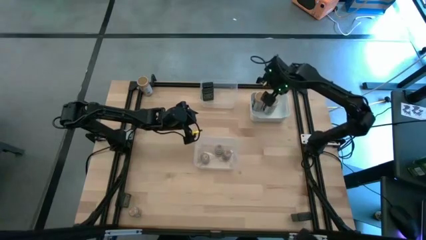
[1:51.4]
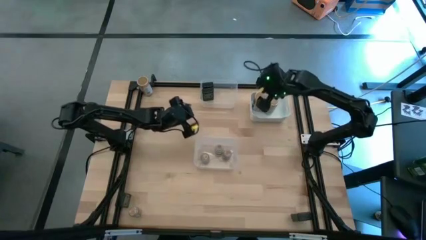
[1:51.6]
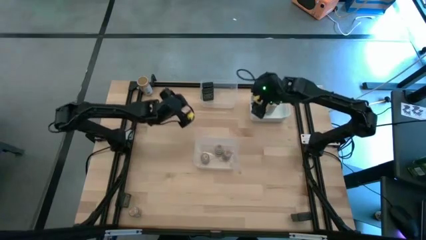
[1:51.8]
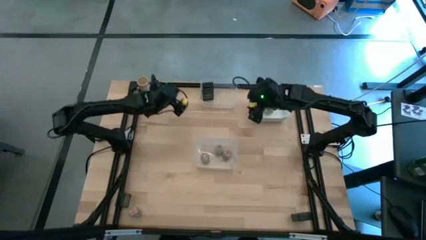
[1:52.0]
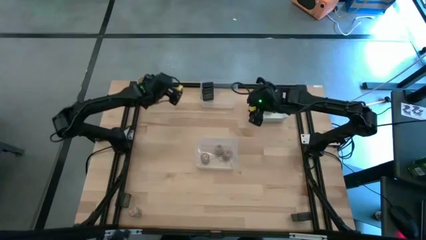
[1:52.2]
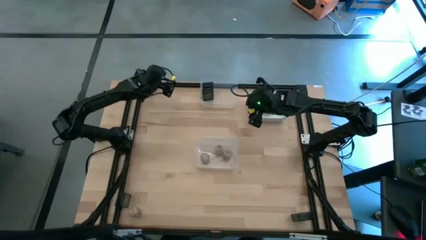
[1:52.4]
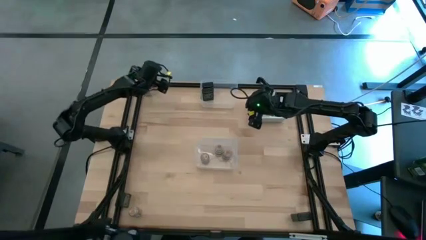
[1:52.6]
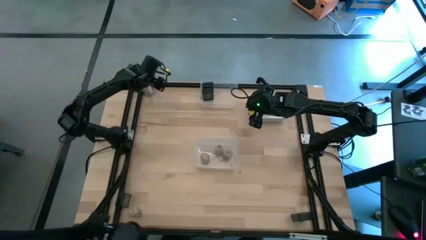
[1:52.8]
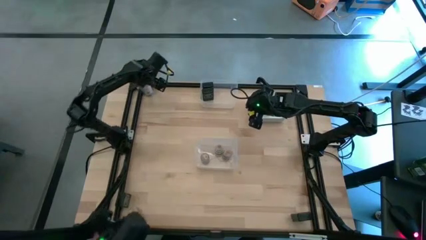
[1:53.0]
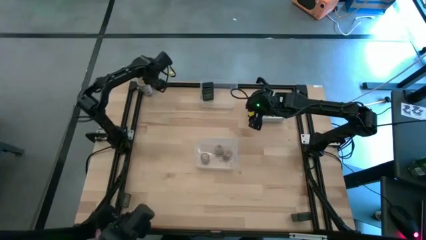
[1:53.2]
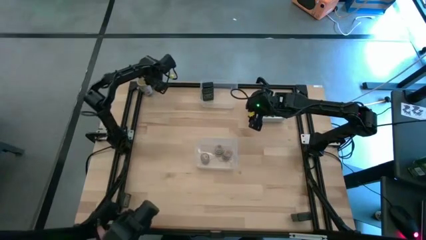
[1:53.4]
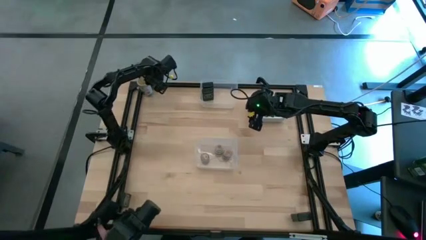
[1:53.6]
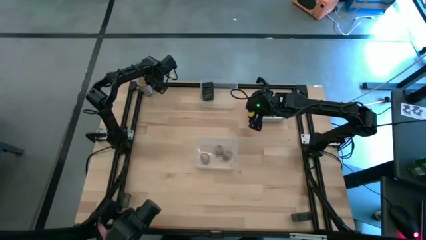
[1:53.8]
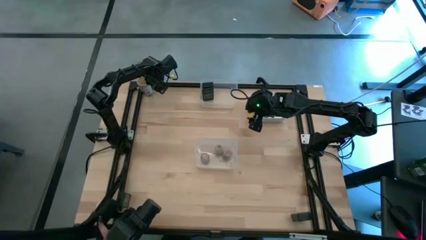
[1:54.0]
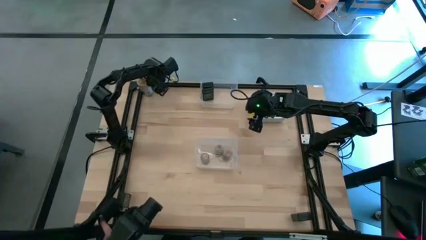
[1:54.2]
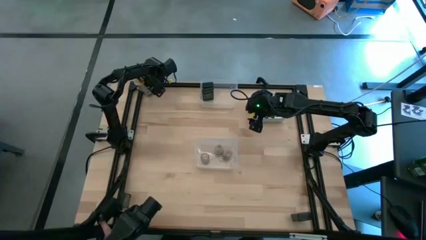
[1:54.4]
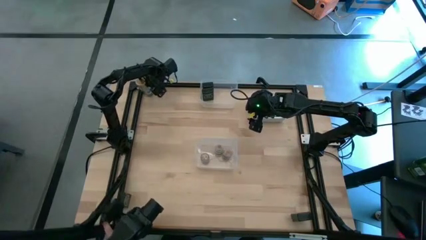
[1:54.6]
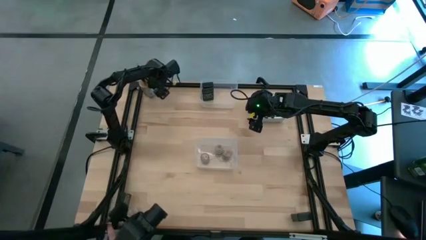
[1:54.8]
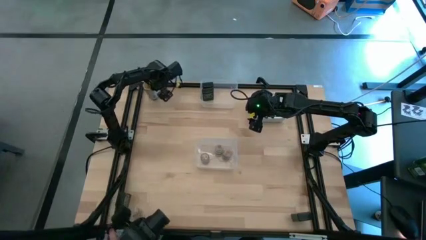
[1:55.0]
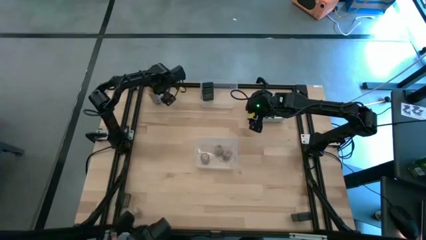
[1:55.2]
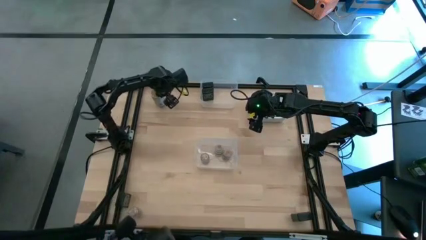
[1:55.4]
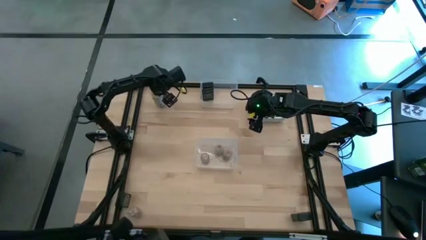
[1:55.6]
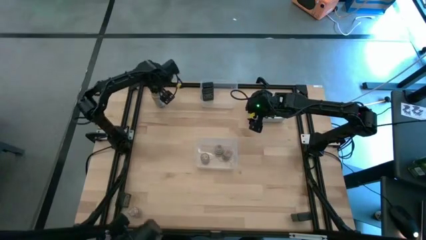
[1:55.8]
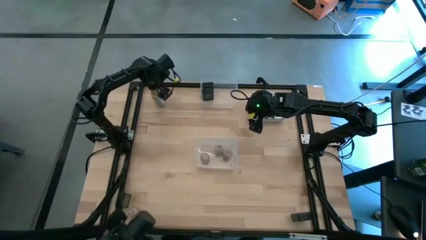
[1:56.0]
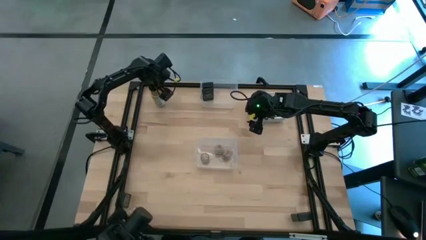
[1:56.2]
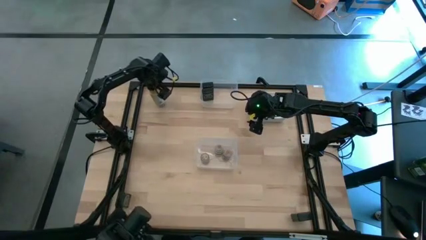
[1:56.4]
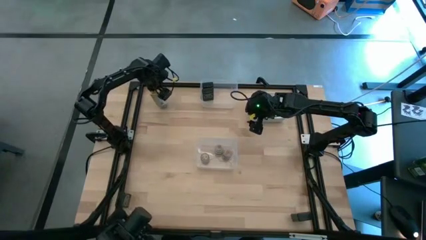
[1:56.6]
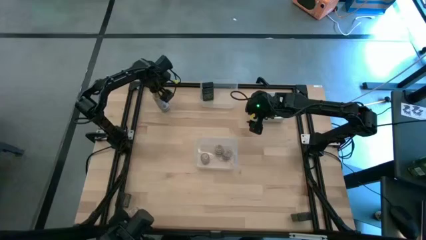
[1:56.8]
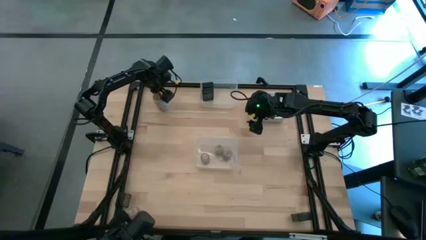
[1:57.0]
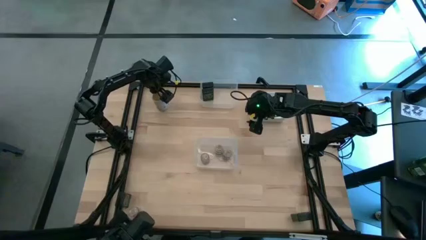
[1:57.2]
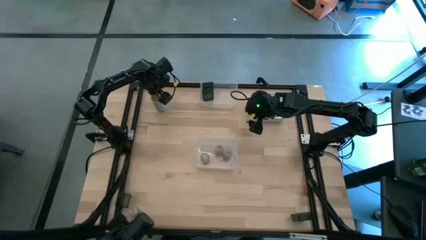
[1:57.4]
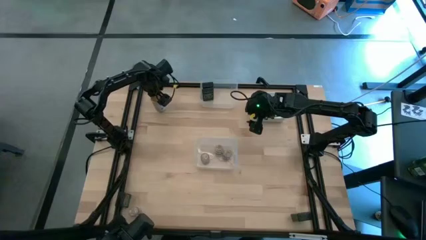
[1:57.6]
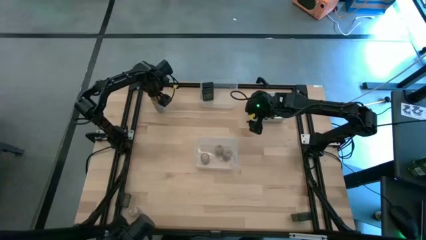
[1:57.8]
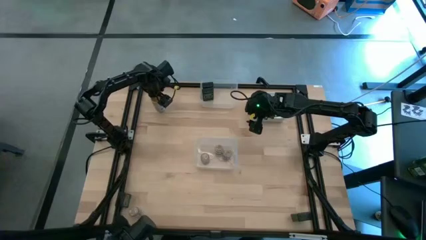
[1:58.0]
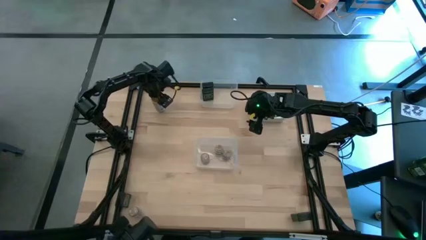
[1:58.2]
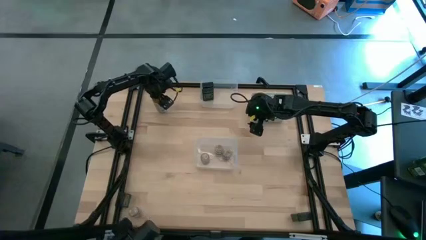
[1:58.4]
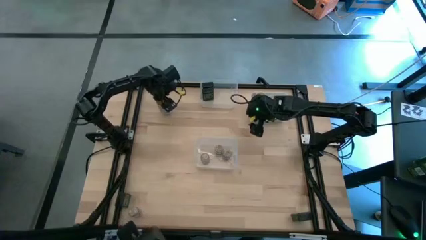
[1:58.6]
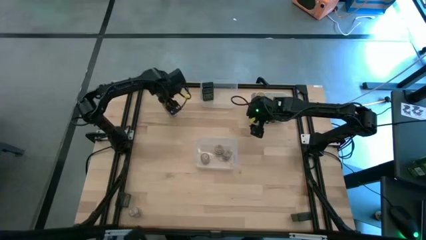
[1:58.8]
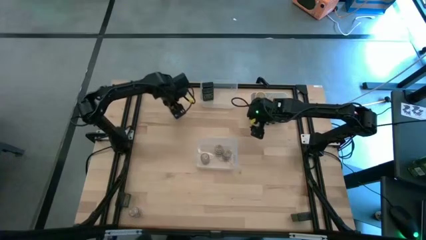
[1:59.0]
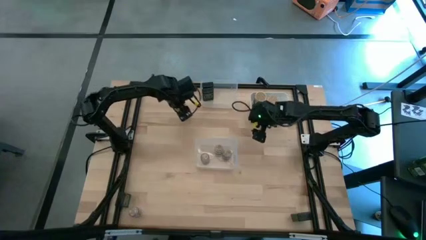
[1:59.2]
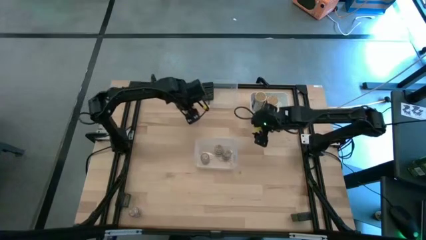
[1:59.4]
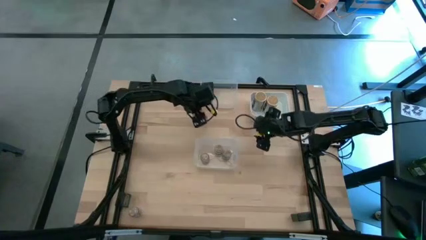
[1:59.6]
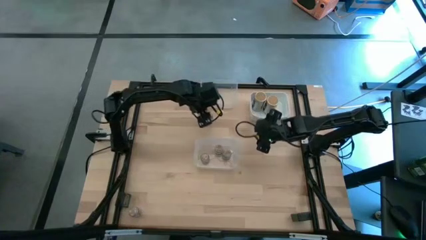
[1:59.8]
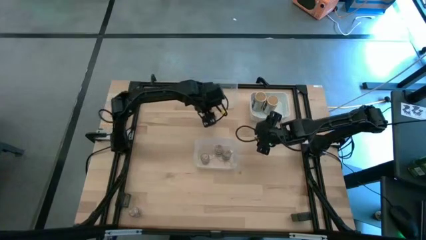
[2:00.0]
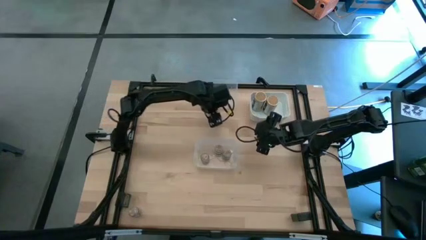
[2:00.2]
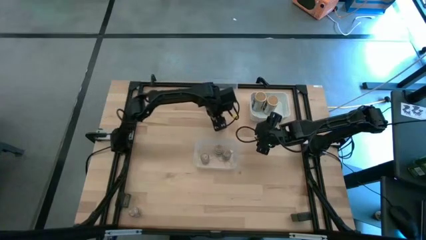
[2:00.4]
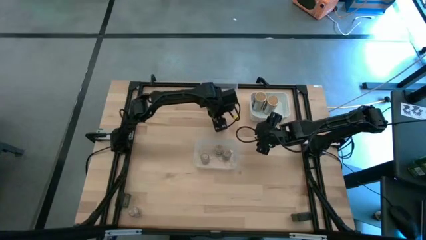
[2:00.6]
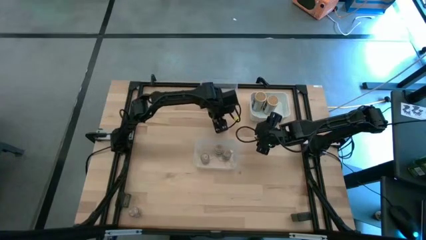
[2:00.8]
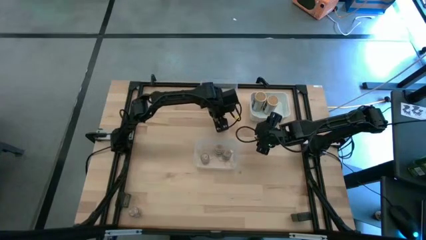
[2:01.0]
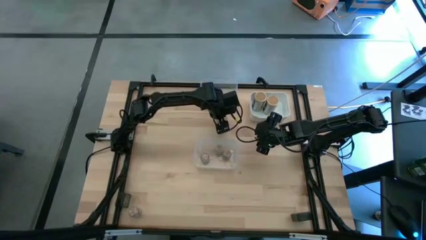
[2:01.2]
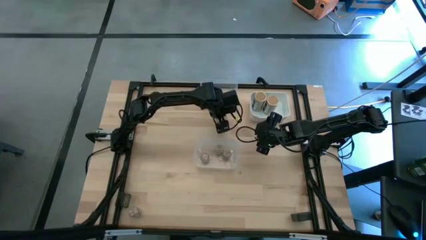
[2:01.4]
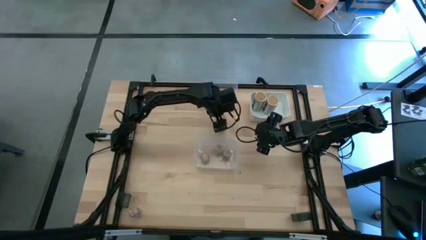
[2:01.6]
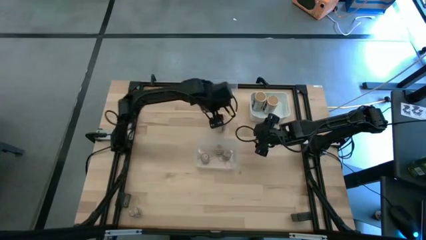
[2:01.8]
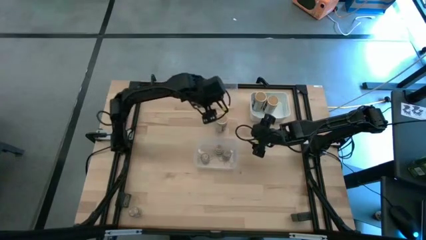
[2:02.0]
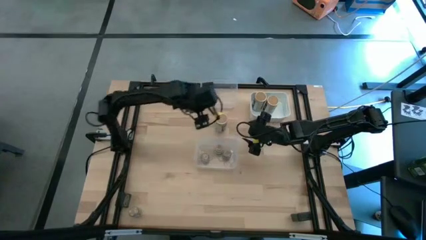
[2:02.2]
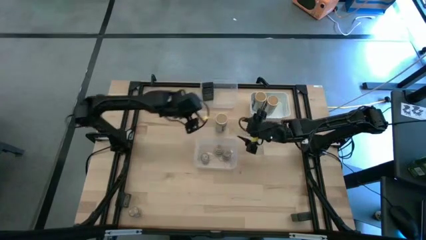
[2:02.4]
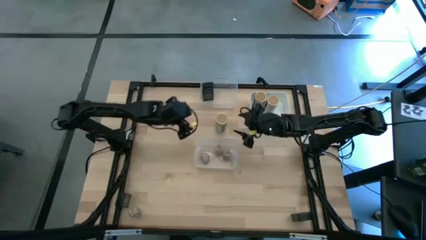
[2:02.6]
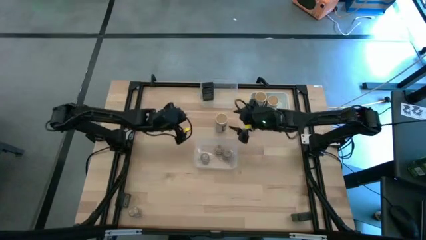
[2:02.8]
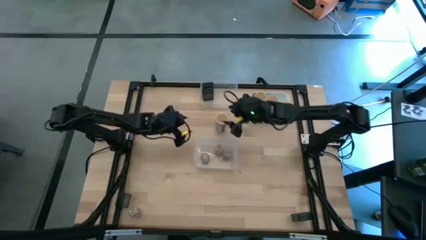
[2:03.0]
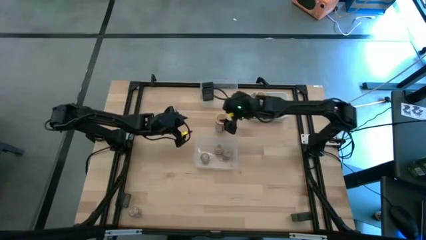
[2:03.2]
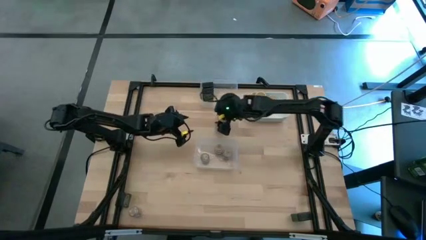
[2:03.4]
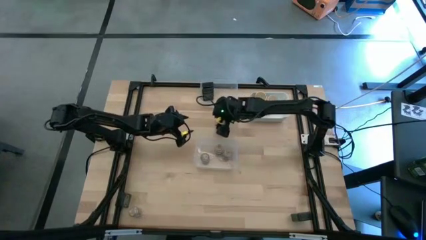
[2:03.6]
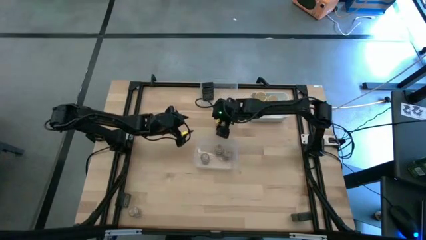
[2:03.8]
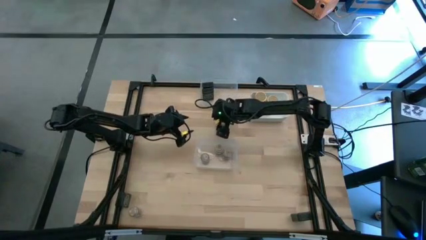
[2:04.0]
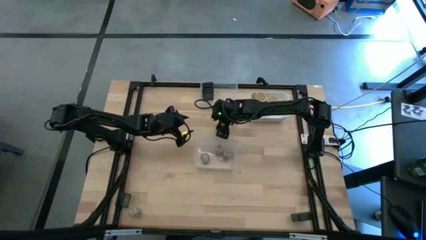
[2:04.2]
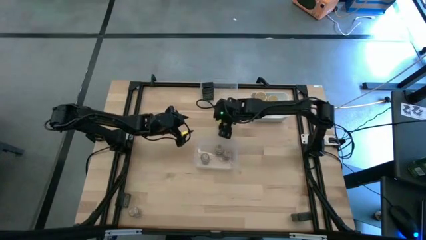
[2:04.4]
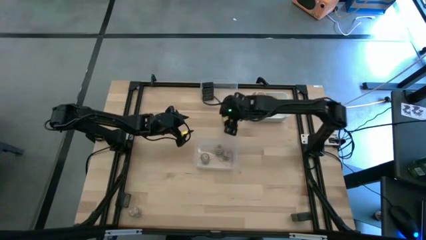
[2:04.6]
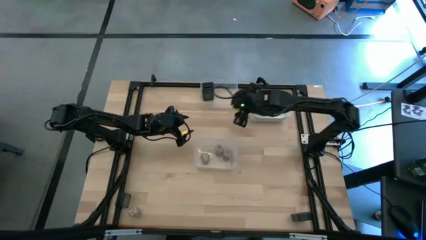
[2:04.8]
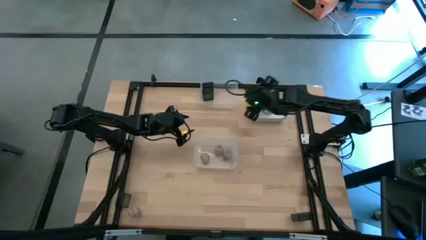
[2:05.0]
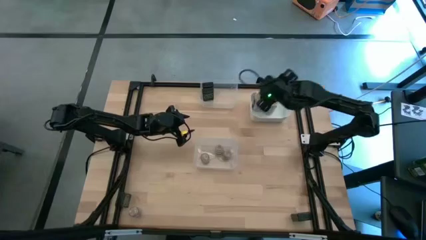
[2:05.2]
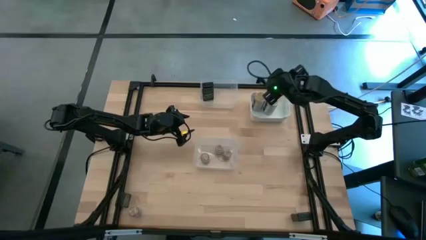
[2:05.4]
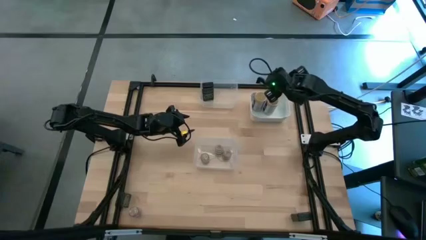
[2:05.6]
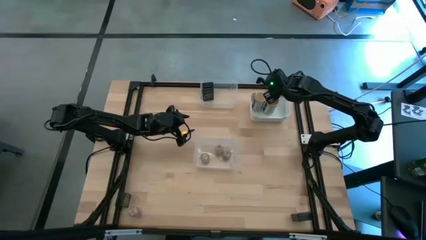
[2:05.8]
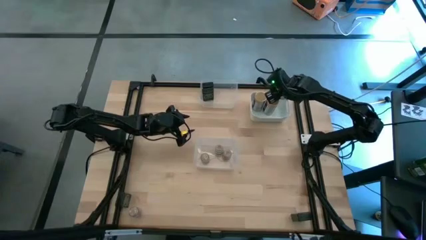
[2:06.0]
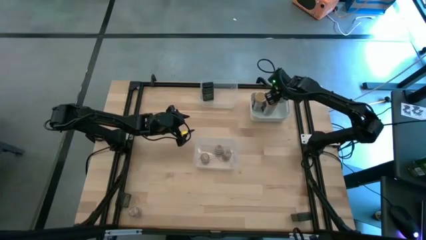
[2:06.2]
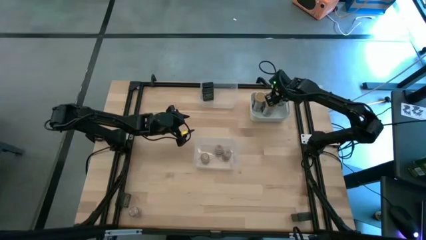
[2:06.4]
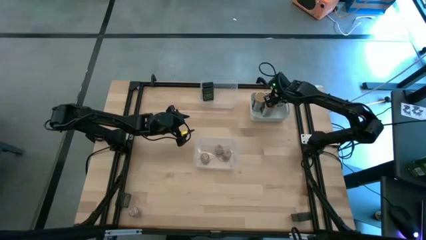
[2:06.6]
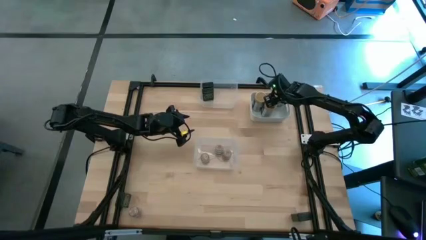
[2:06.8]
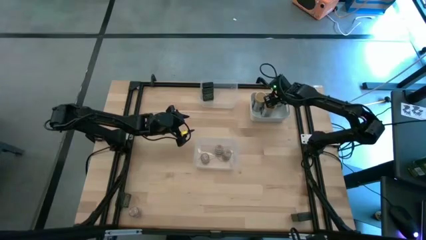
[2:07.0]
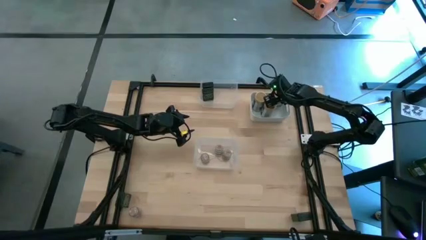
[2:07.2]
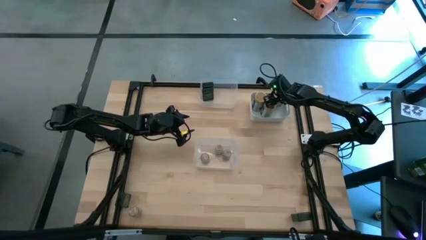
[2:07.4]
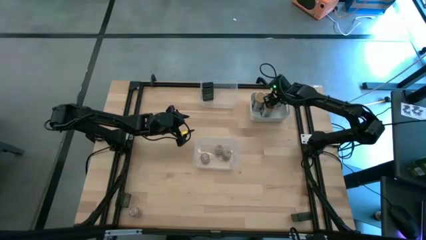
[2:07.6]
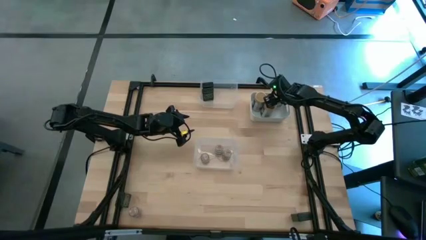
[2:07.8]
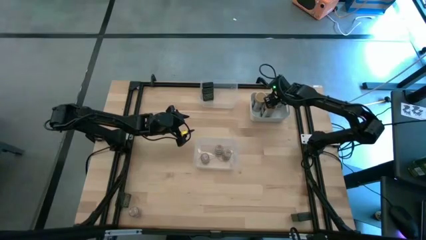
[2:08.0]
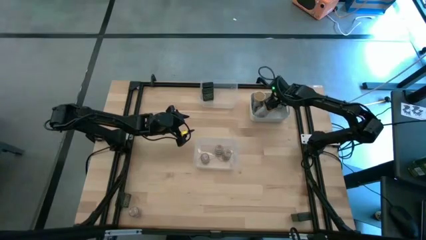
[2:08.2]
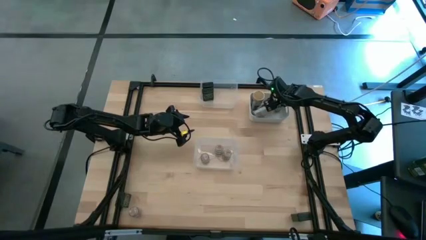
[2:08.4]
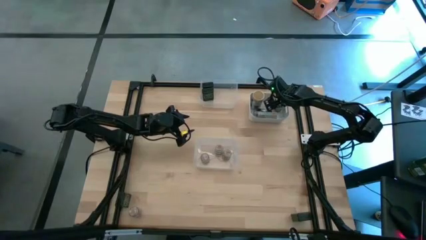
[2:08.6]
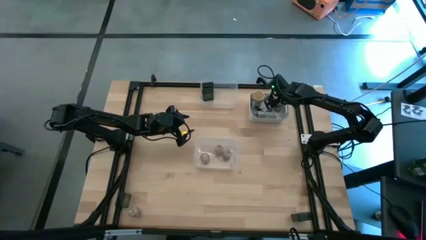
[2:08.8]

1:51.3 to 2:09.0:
Task: Sort spices by type
Put the brown seasoning bottle into the white bin
